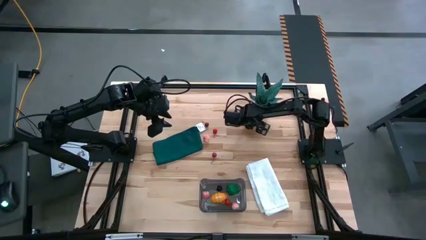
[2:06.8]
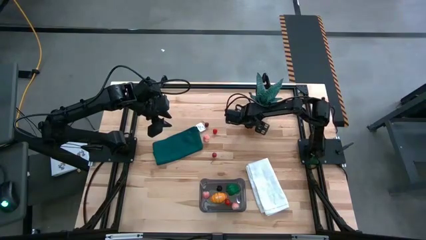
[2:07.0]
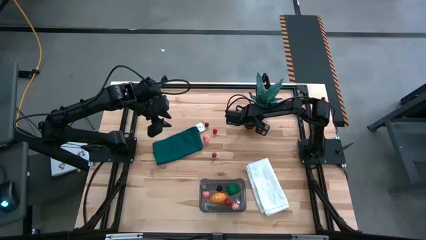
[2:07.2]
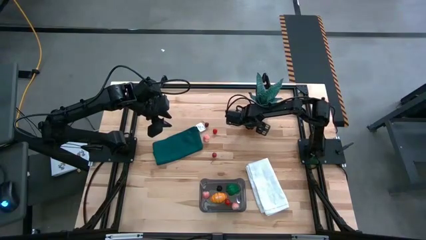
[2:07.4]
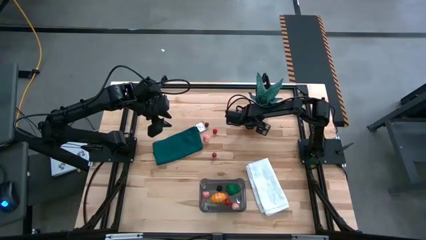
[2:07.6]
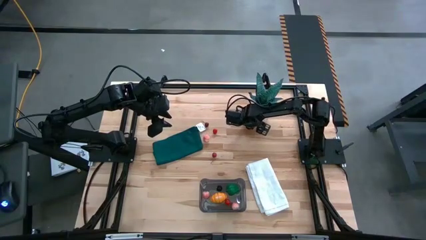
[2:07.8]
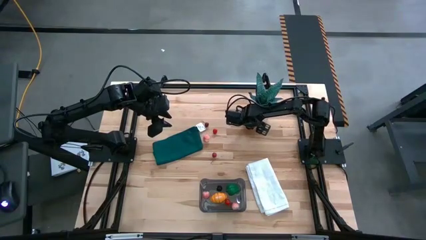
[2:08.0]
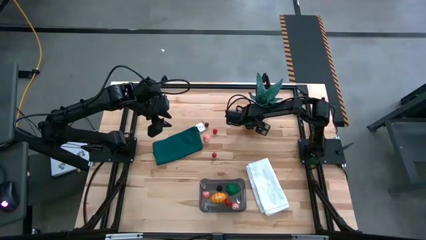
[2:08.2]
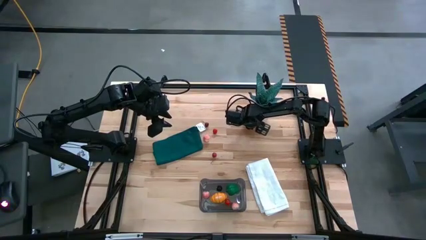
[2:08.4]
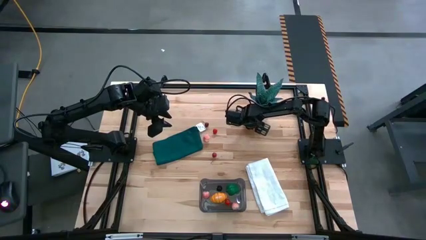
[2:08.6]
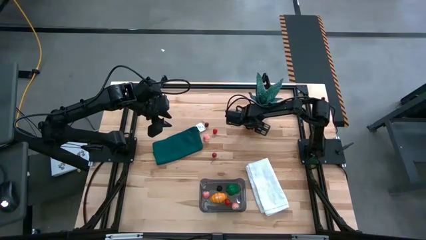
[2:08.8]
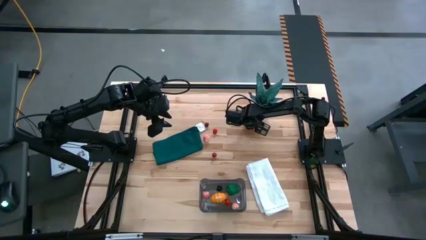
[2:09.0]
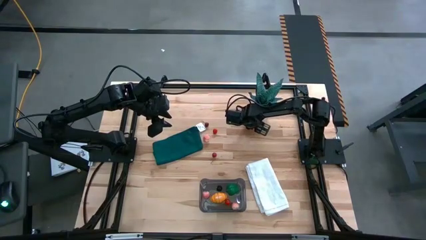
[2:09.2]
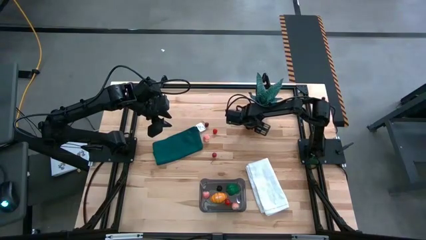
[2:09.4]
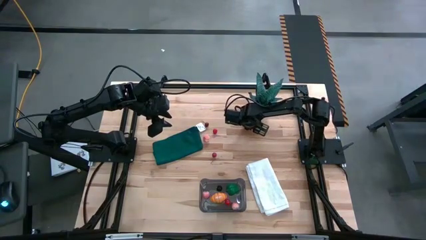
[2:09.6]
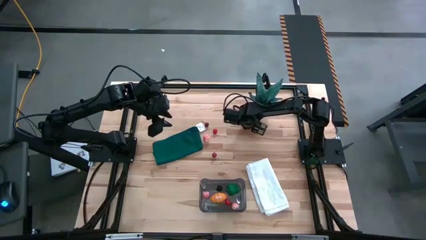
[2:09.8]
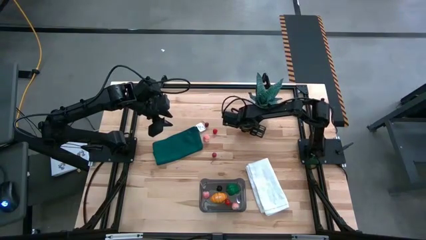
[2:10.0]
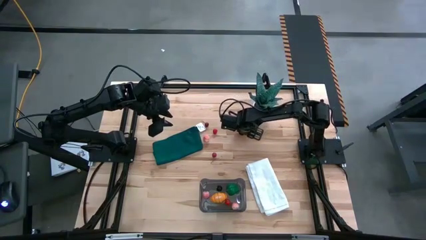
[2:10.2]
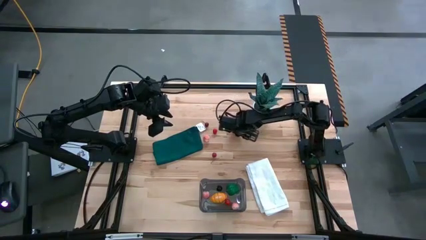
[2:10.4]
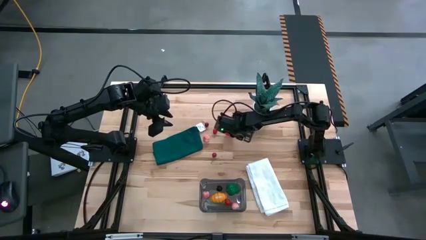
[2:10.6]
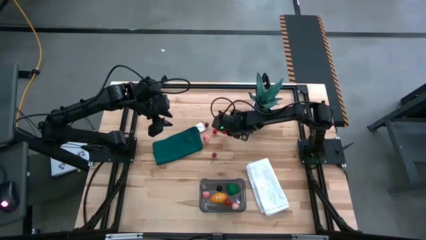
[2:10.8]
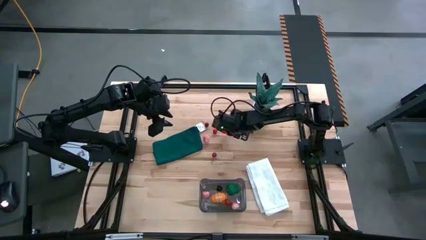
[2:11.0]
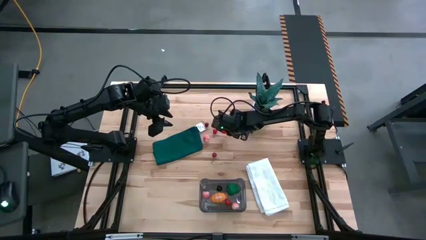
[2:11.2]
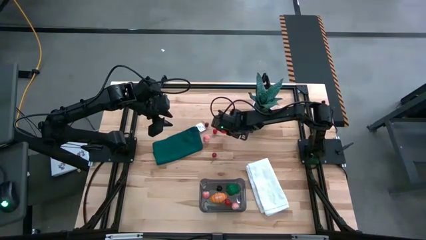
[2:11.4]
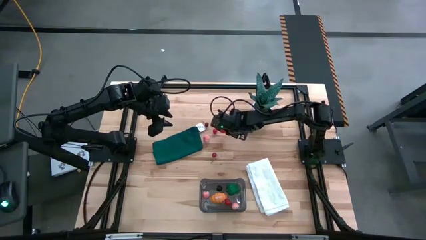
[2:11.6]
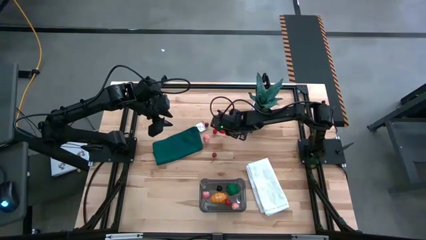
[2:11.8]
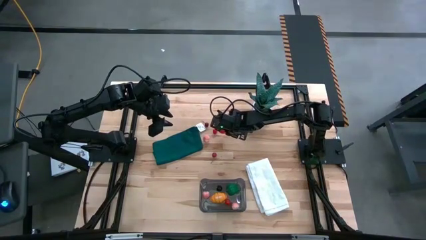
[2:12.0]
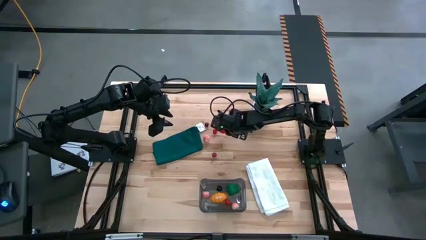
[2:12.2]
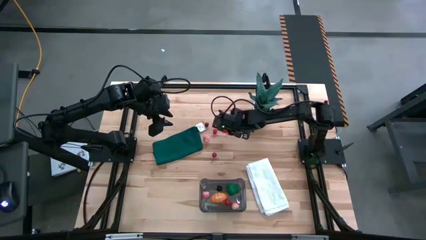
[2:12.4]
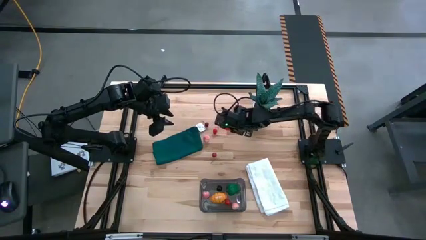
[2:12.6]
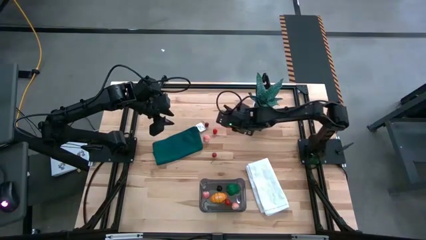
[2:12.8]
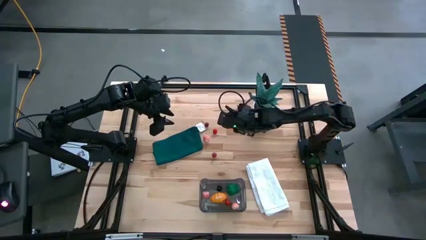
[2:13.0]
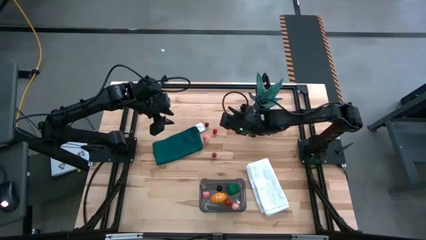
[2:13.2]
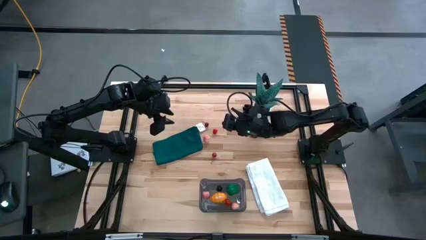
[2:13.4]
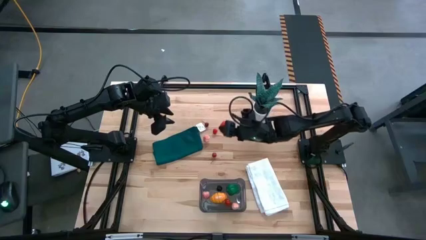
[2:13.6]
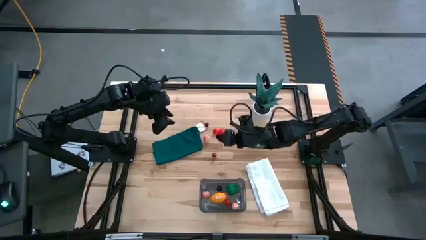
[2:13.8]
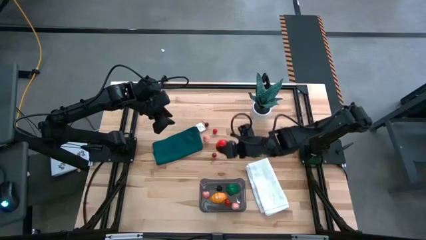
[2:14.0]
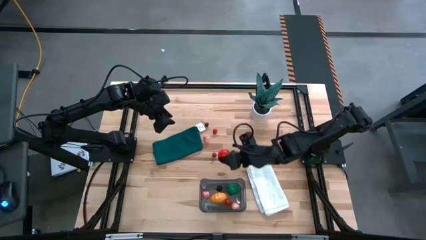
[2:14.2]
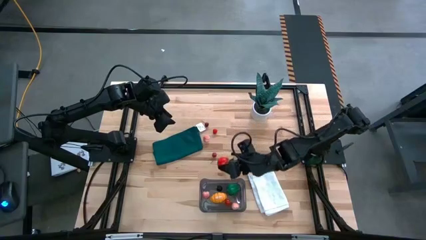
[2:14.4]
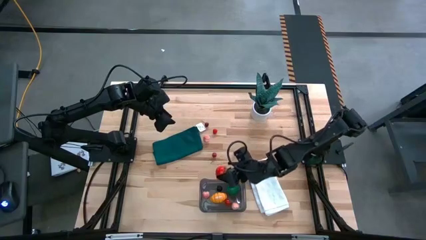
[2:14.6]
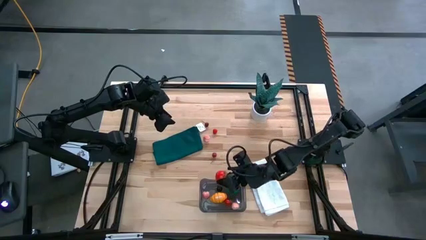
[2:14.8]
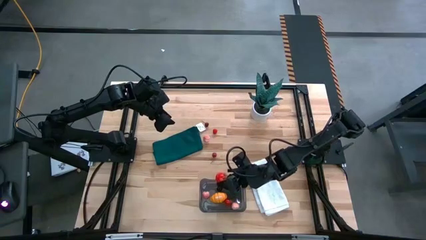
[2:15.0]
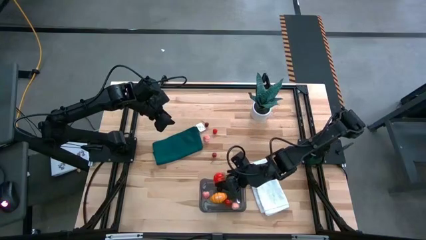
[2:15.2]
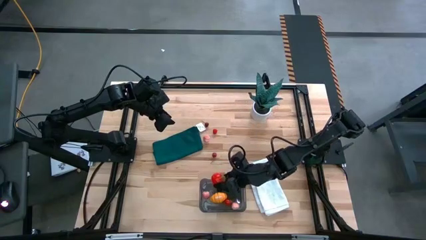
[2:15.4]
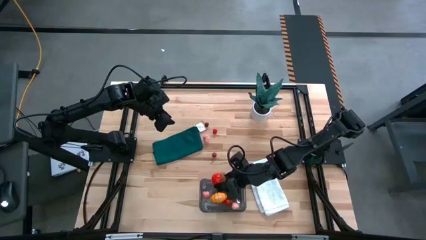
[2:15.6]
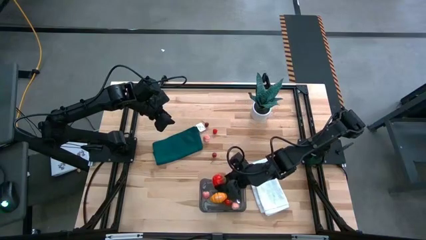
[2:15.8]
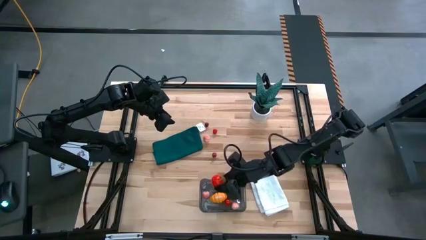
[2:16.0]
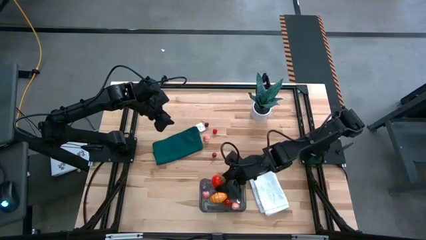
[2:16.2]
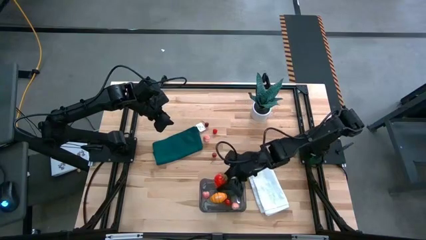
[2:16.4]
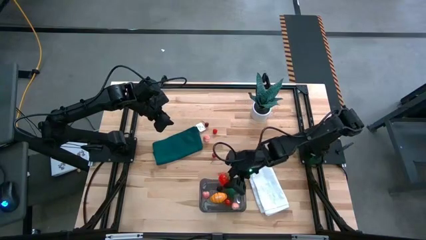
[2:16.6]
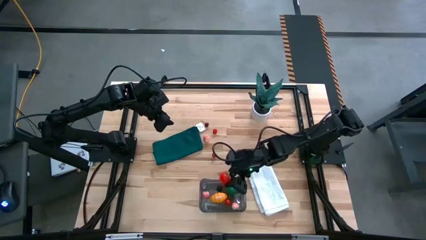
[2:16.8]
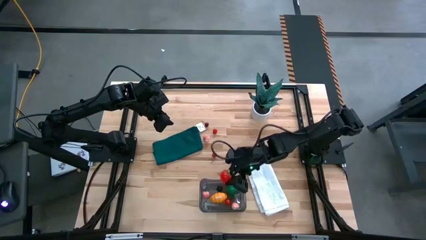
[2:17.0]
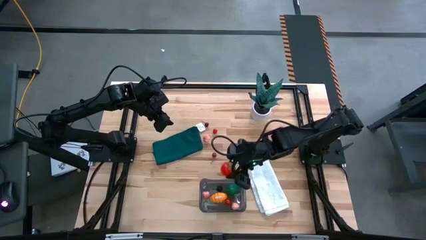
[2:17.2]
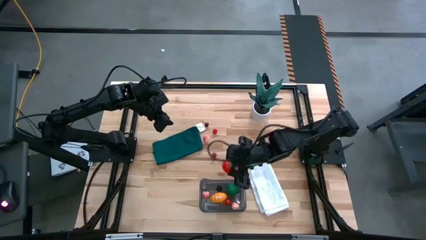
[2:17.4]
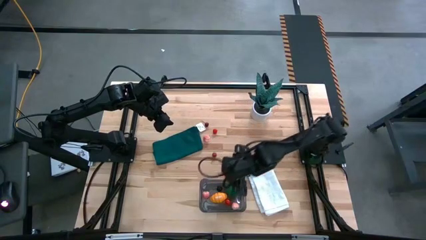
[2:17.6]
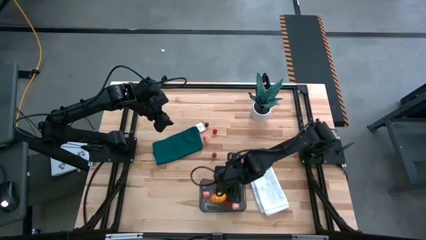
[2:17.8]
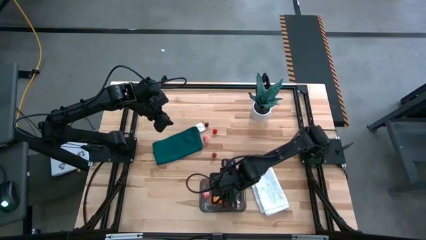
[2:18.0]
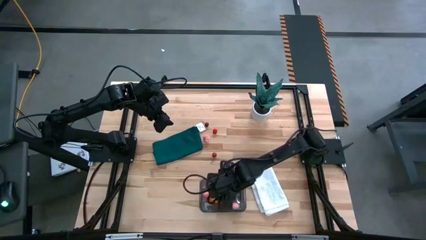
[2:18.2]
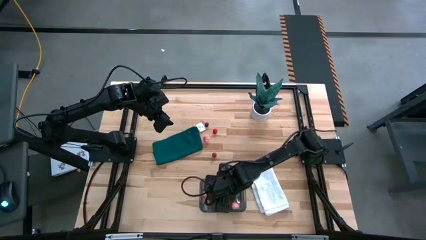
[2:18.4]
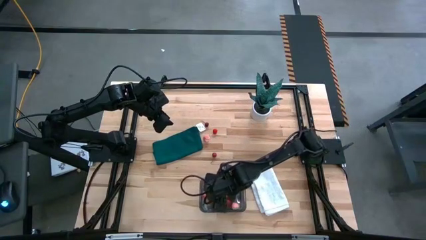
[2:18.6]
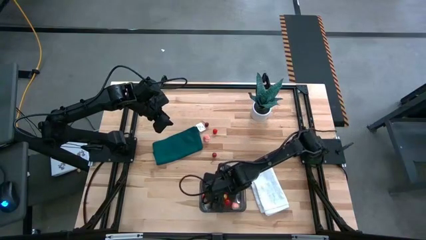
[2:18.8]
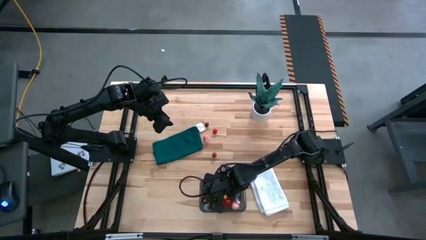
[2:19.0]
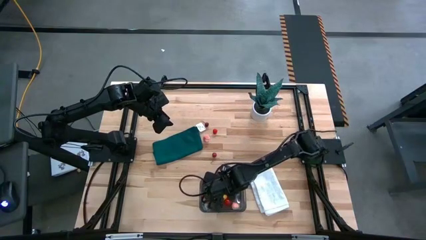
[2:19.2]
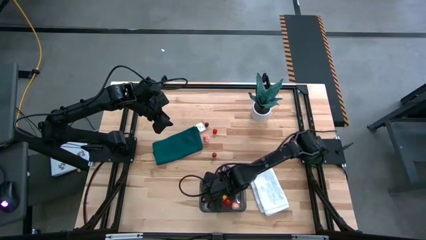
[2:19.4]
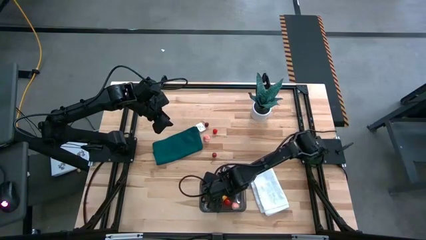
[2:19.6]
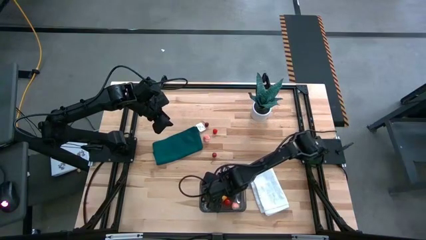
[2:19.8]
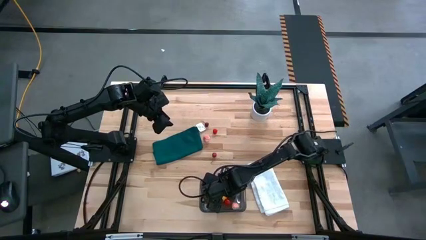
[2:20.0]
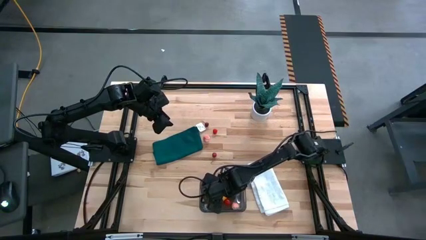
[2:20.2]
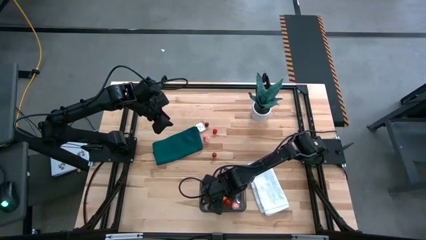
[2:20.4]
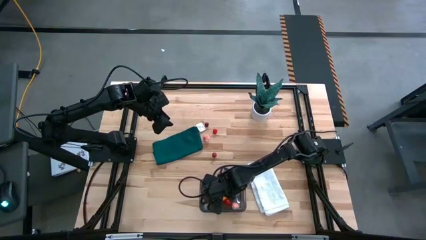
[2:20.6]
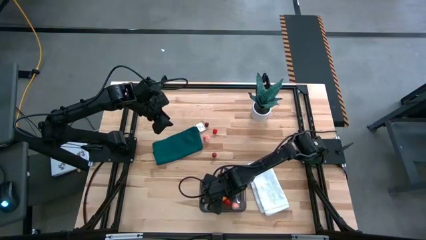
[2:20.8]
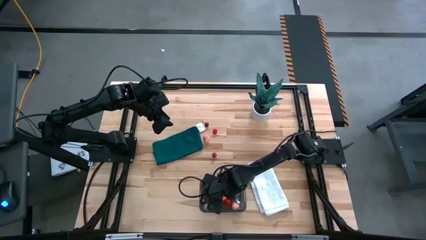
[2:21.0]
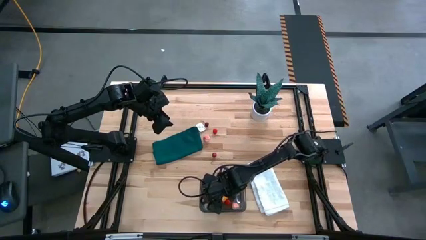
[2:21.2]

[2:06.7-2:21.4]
Task: Pick and placing Produce into tupperware
Put the red tomato into the black bin
